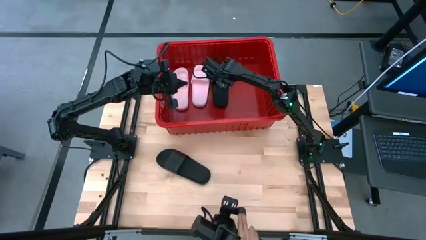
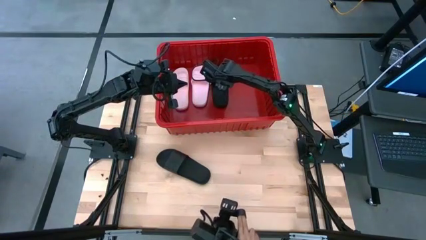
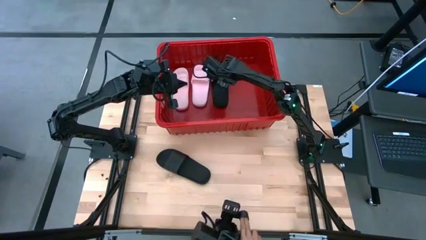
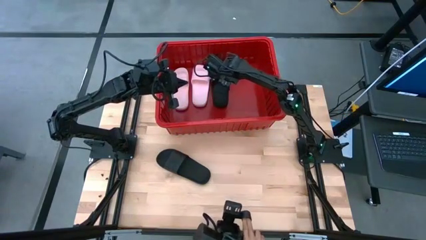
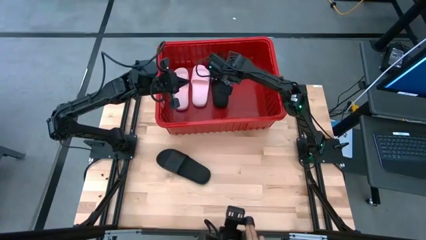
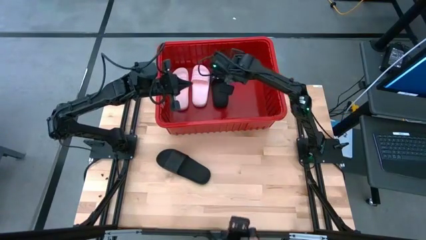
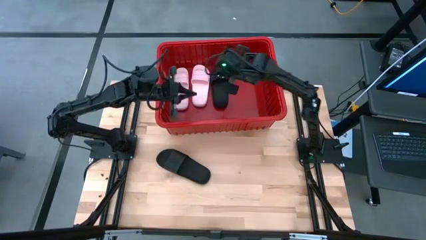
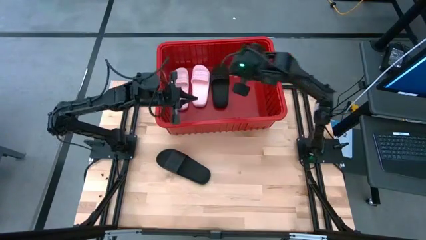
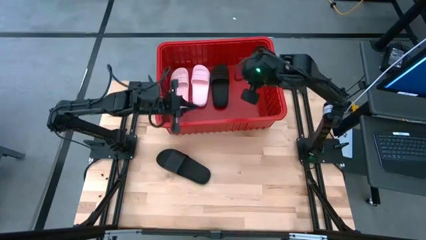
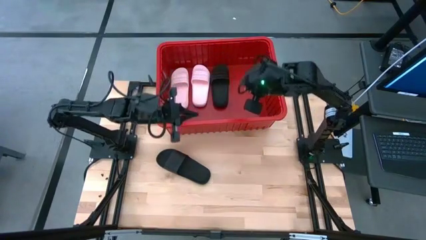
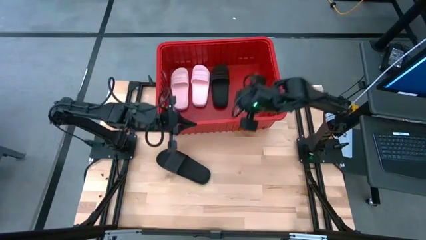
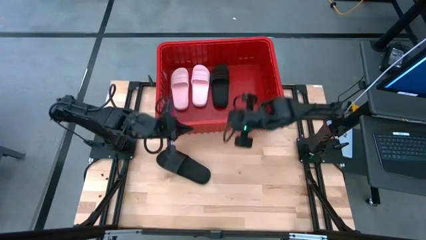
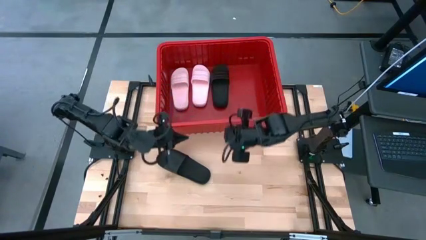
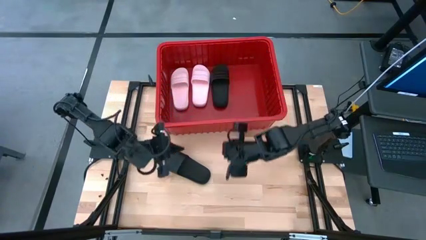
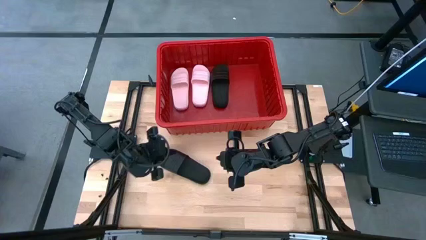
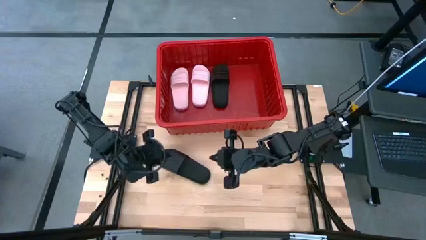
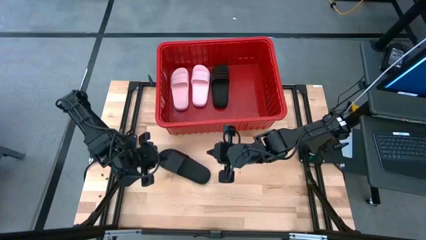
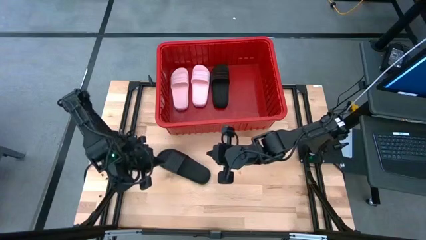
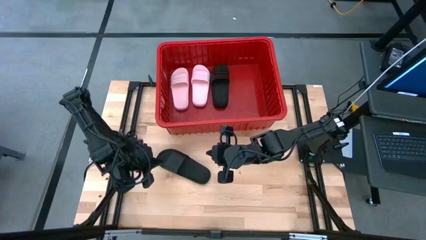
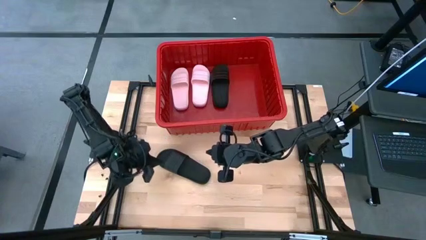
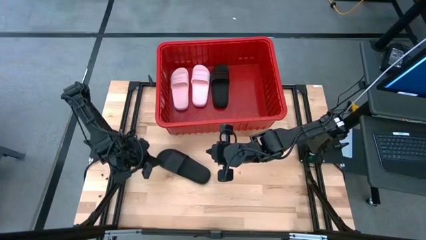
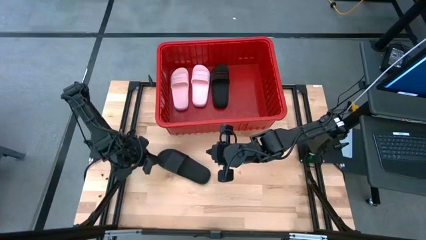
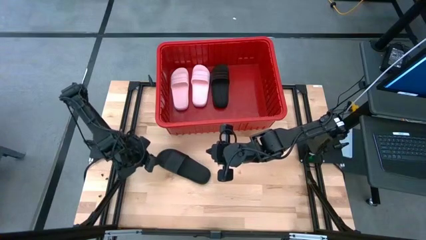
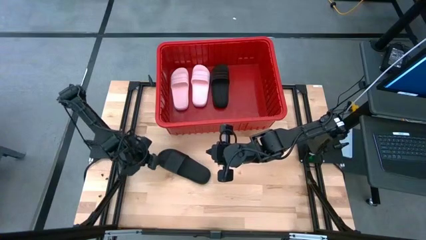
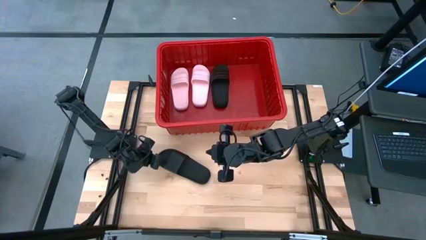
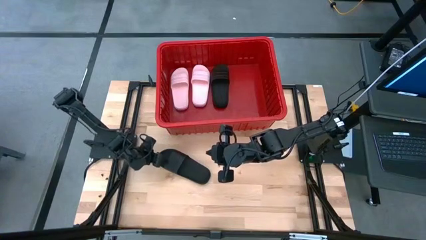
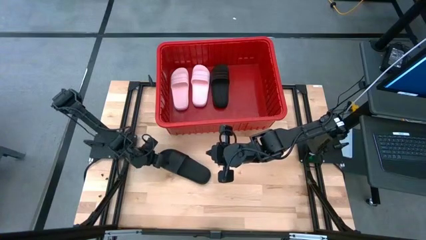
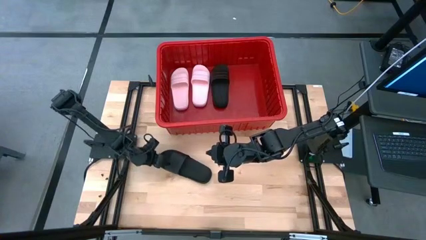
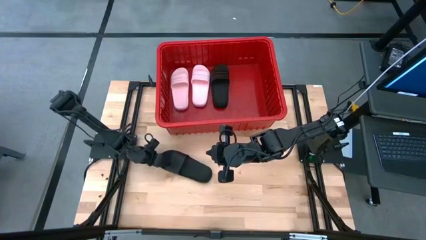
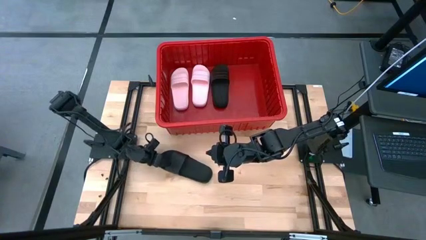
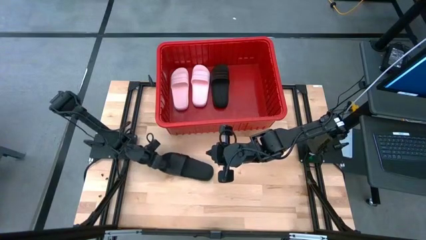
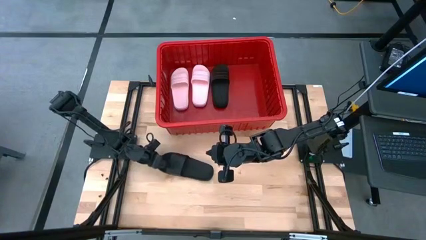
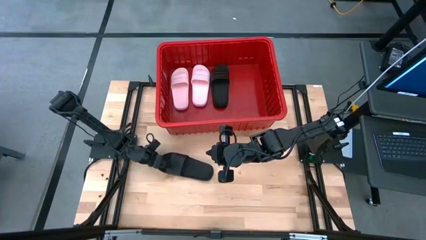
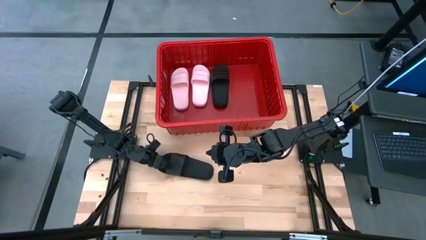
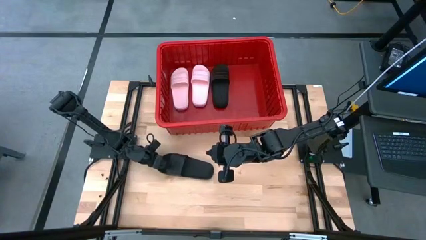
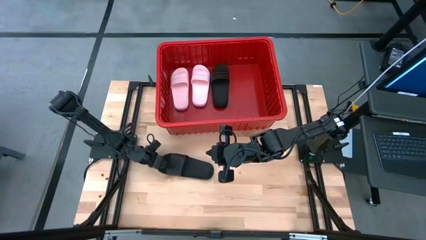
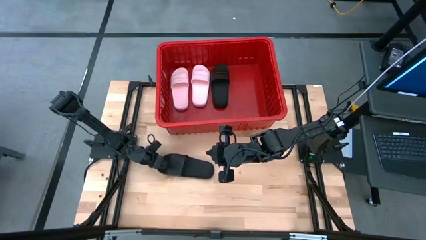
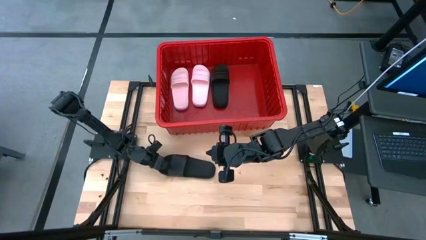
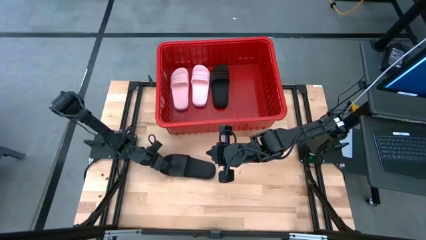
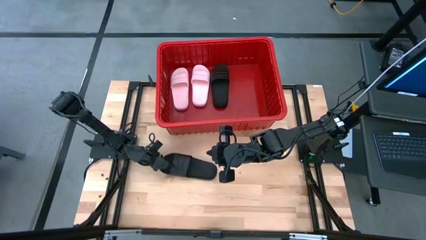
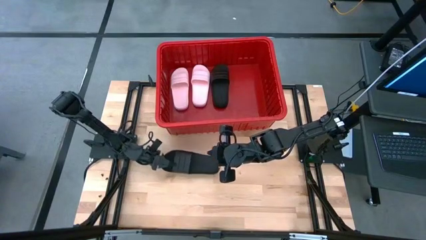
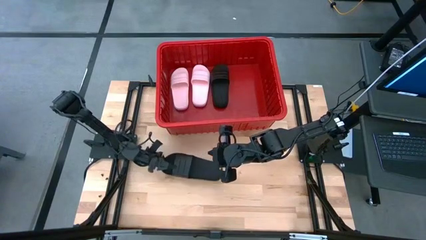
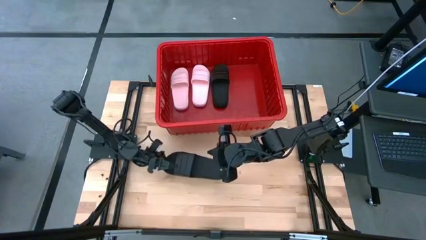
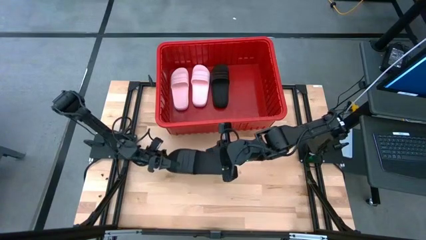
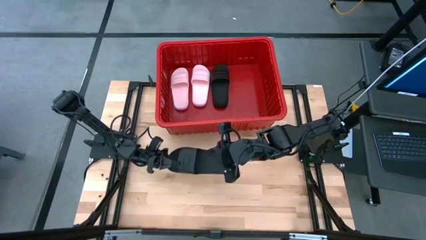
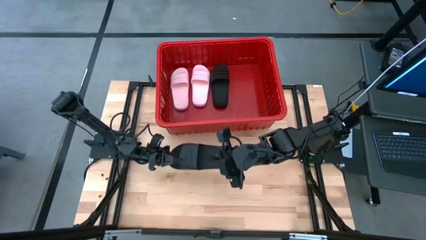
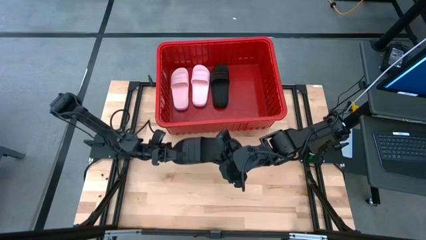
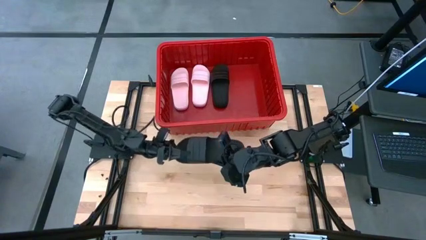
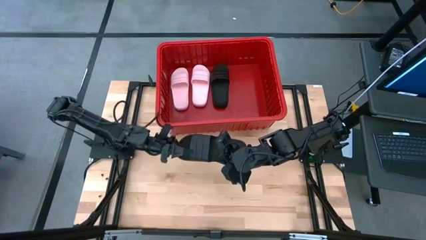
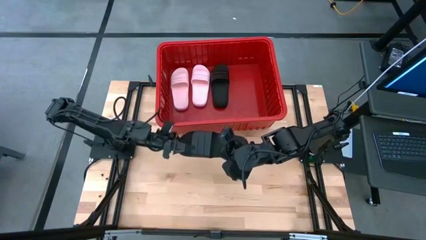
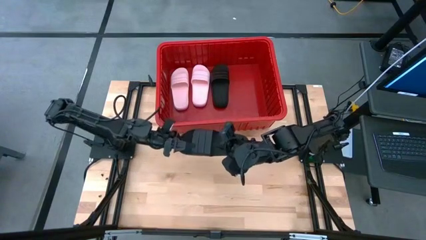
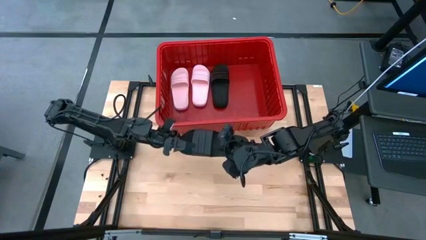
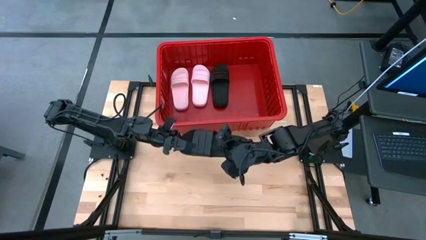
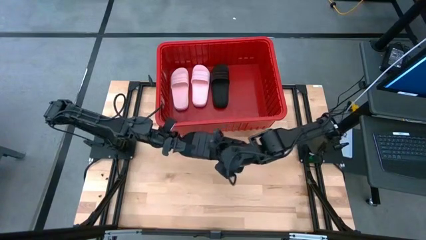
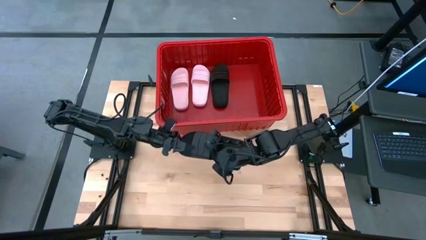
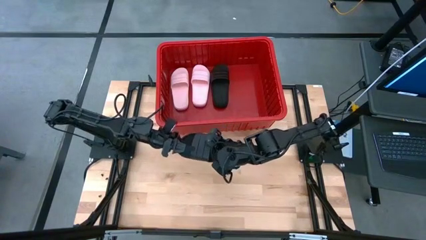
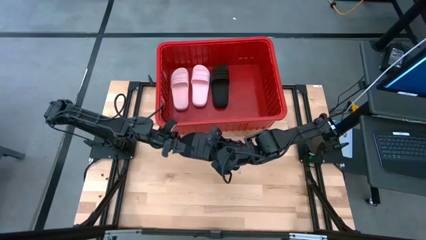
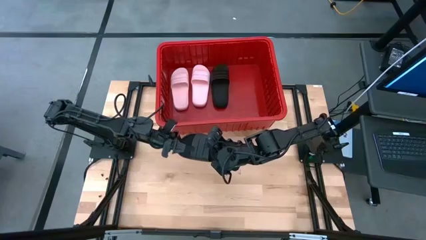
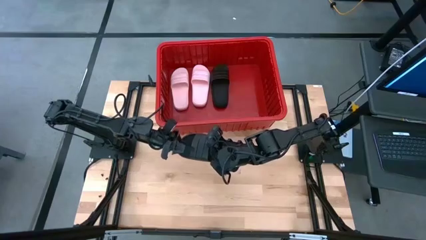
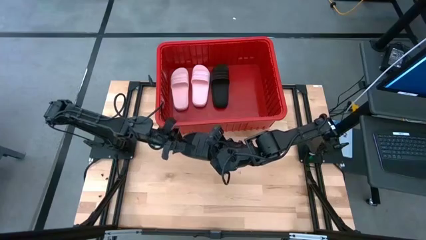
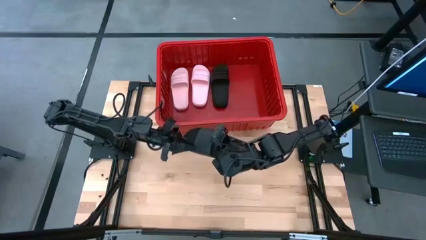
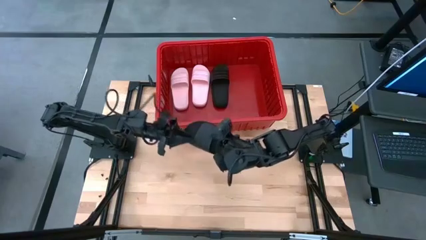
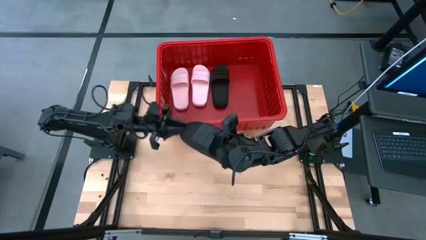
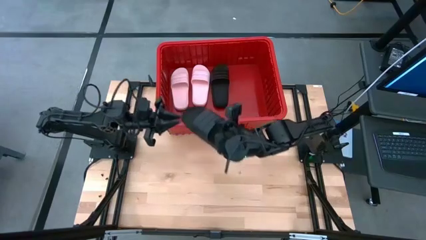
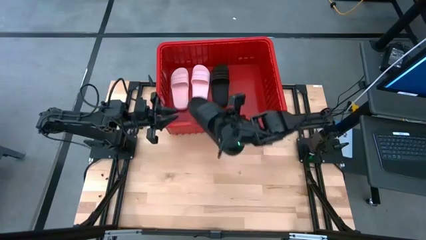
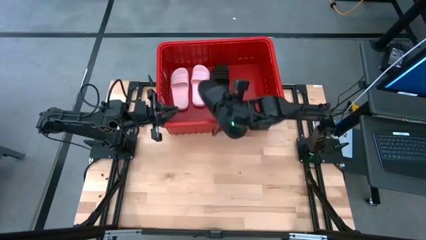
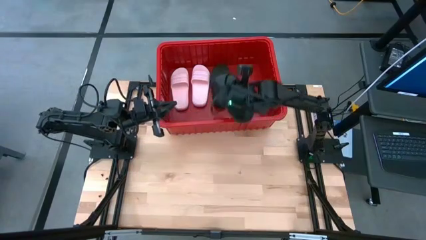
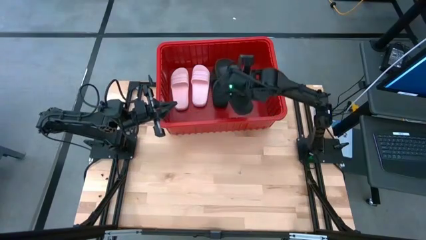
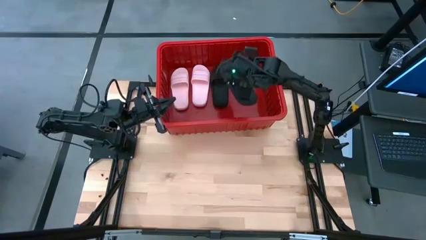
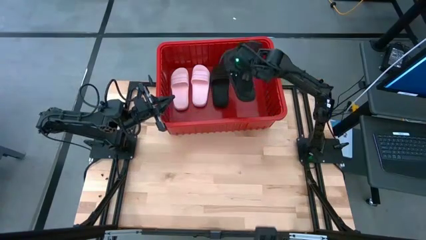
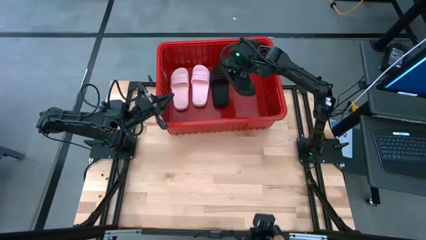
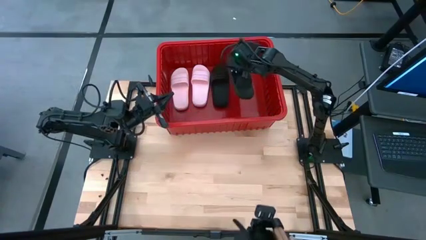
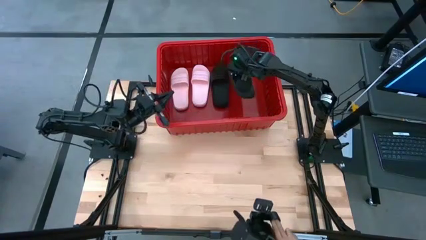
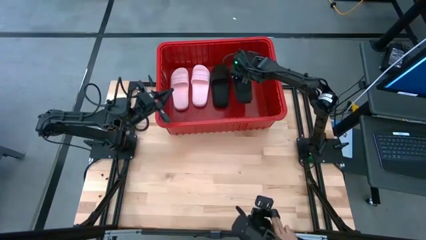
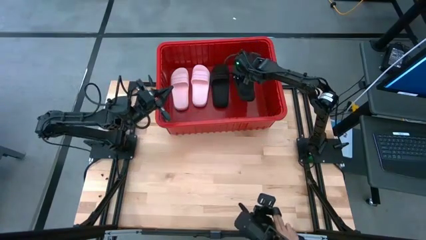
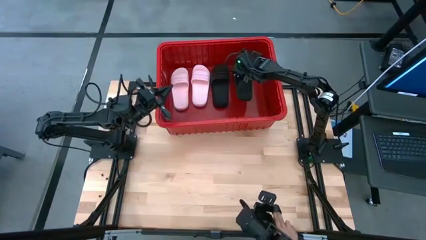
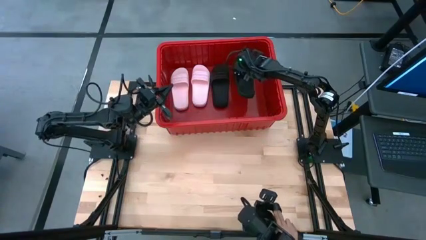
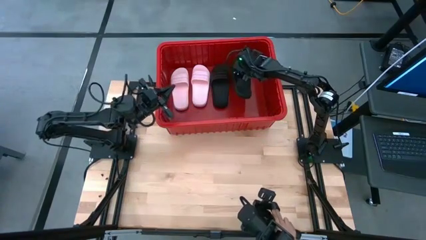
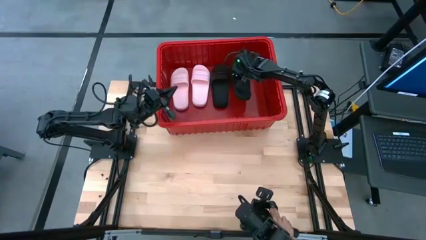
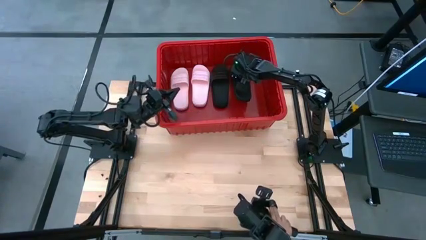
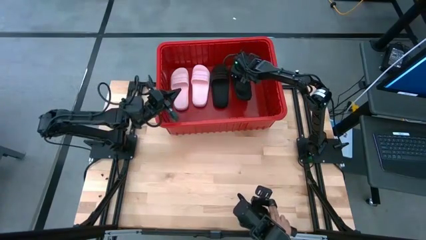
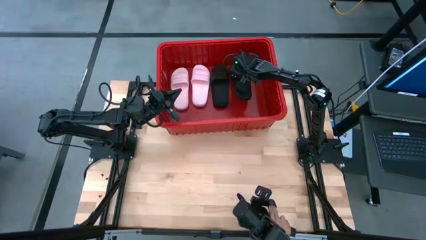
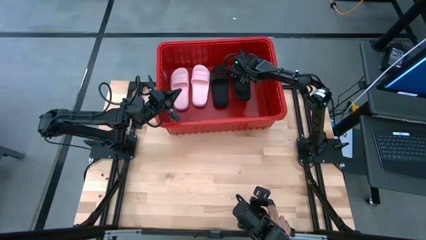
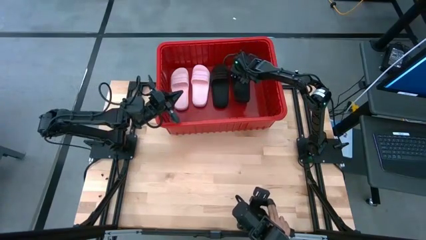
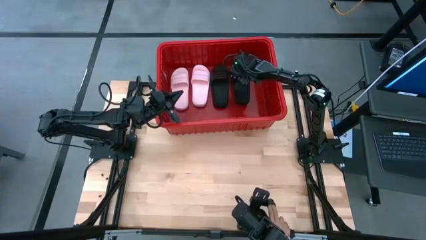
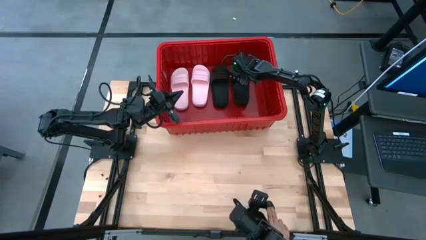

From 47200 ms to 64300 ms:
Task: Pick and place slides into bin
Put the black slide into the red bin
